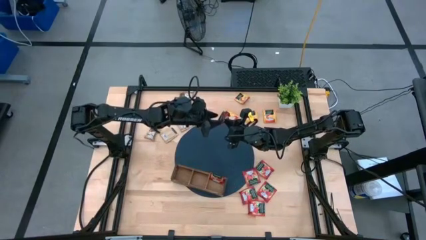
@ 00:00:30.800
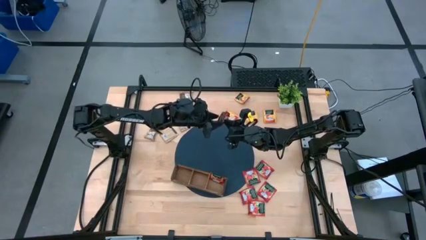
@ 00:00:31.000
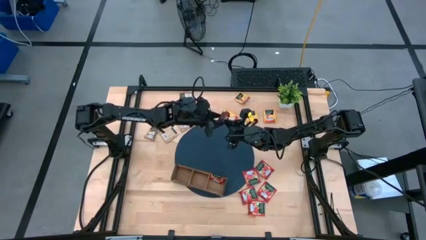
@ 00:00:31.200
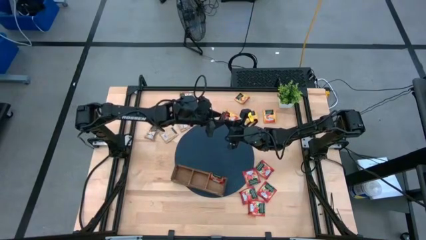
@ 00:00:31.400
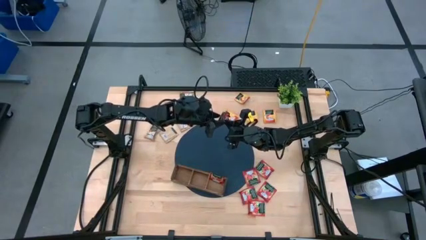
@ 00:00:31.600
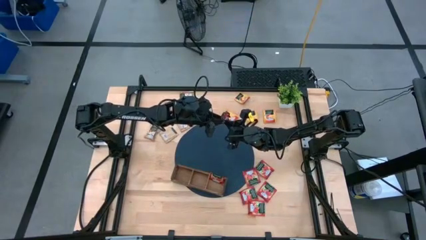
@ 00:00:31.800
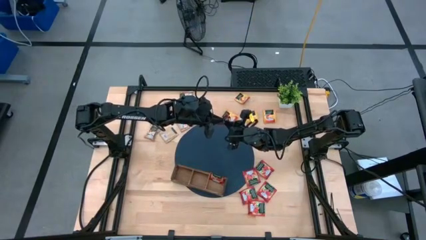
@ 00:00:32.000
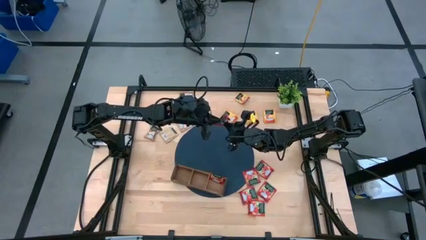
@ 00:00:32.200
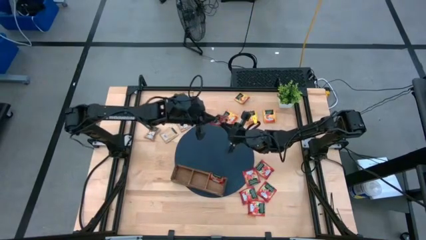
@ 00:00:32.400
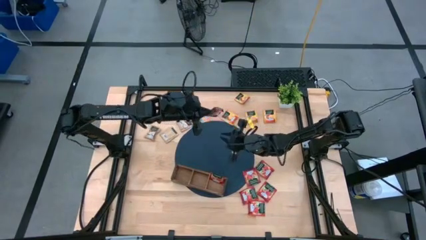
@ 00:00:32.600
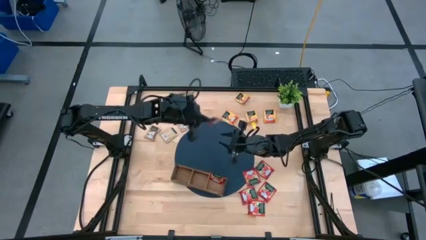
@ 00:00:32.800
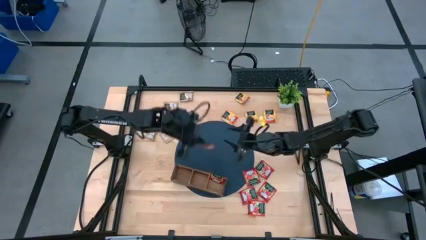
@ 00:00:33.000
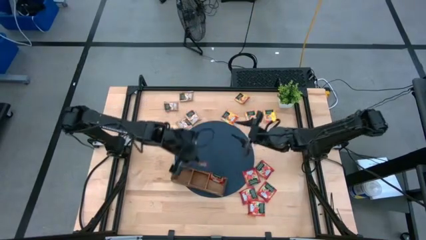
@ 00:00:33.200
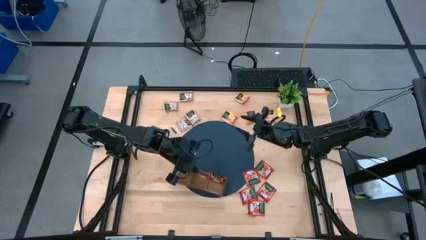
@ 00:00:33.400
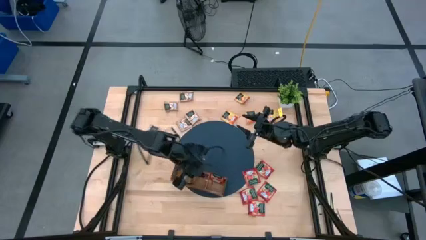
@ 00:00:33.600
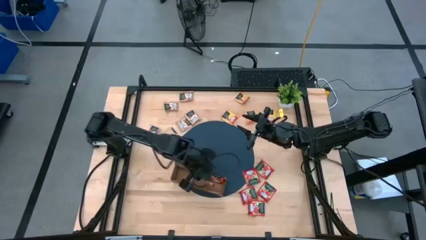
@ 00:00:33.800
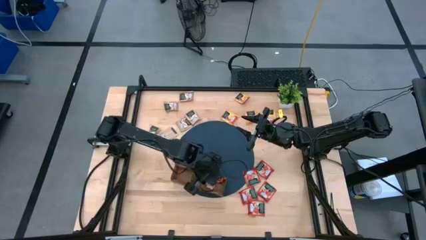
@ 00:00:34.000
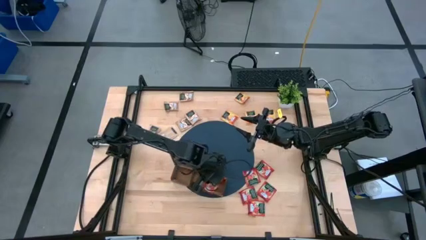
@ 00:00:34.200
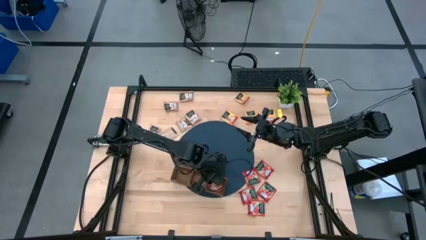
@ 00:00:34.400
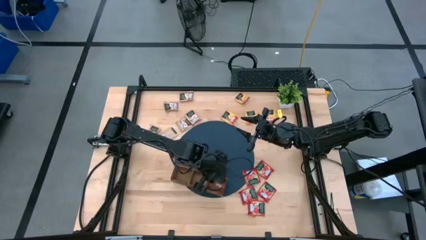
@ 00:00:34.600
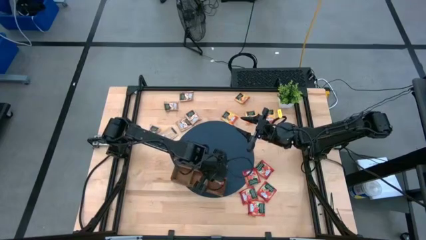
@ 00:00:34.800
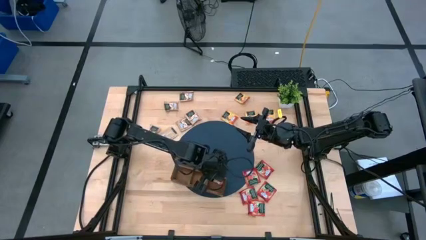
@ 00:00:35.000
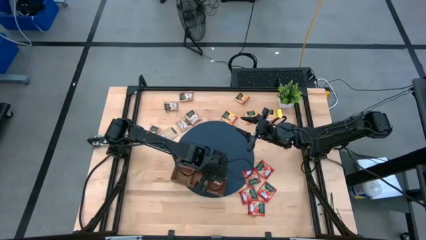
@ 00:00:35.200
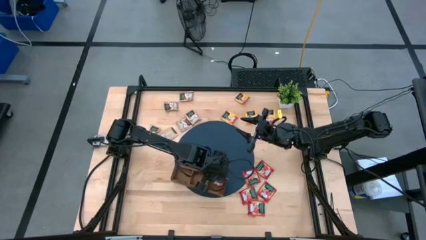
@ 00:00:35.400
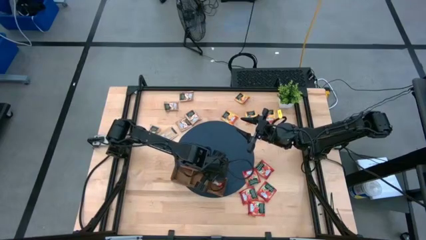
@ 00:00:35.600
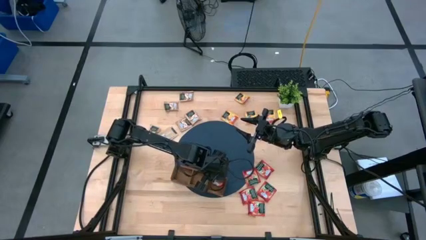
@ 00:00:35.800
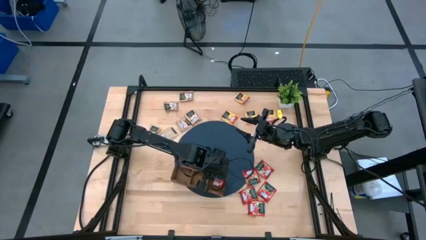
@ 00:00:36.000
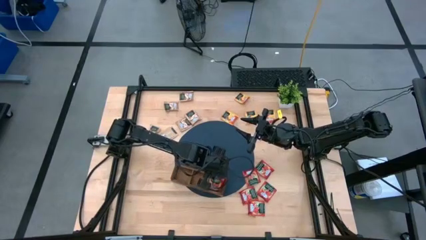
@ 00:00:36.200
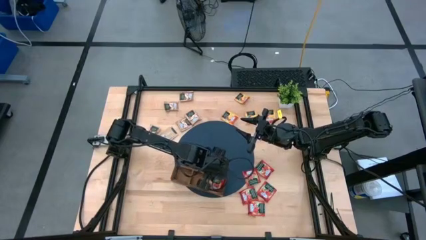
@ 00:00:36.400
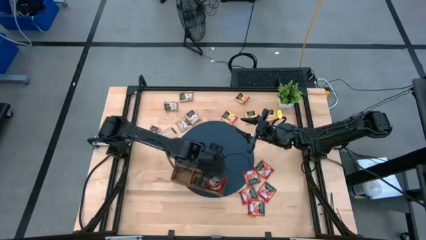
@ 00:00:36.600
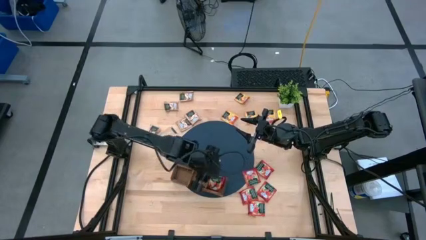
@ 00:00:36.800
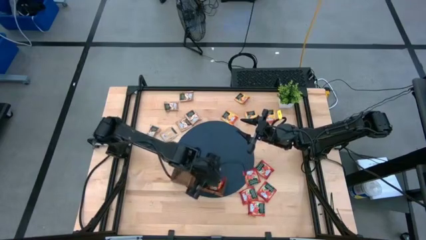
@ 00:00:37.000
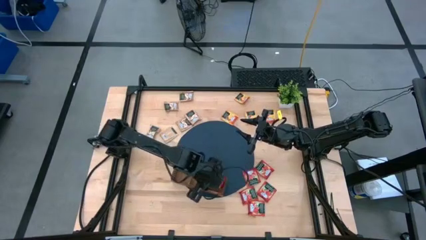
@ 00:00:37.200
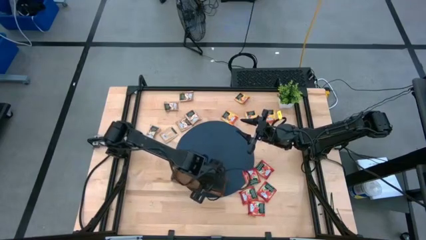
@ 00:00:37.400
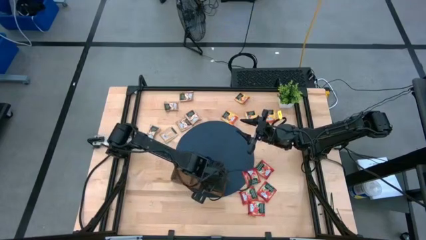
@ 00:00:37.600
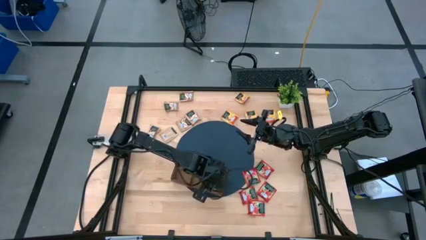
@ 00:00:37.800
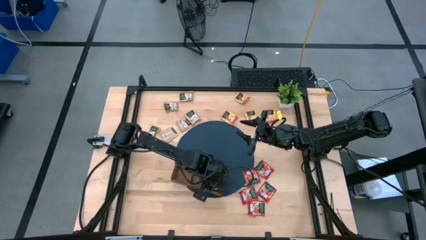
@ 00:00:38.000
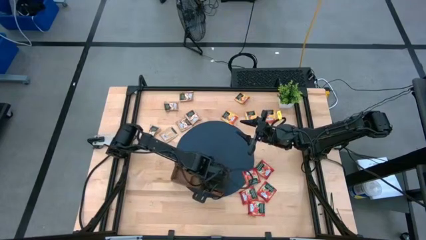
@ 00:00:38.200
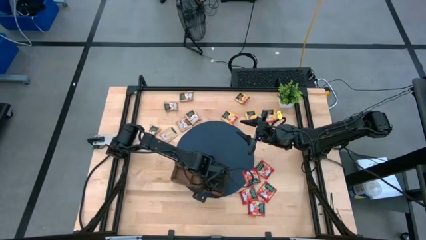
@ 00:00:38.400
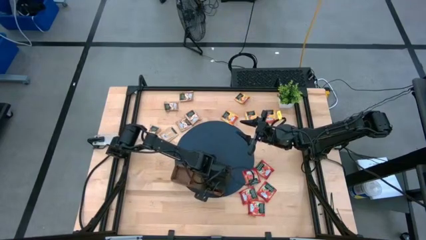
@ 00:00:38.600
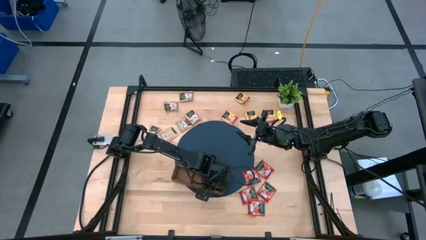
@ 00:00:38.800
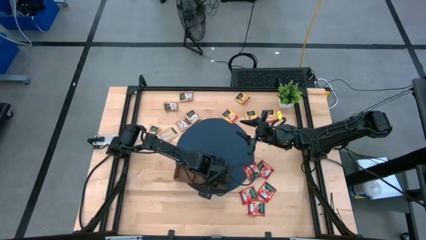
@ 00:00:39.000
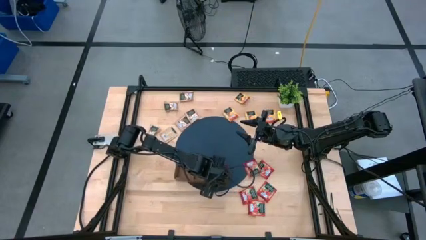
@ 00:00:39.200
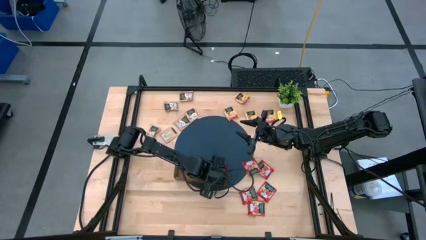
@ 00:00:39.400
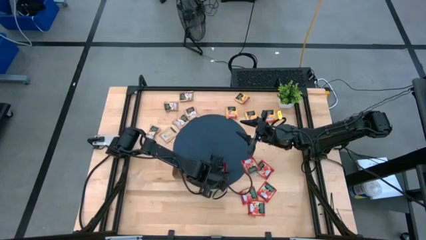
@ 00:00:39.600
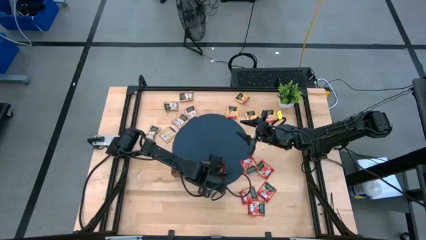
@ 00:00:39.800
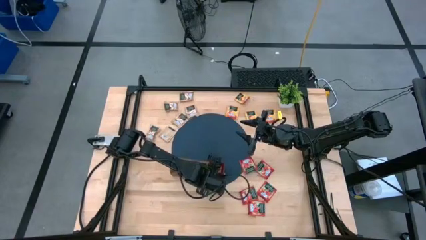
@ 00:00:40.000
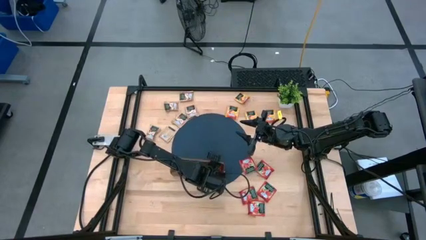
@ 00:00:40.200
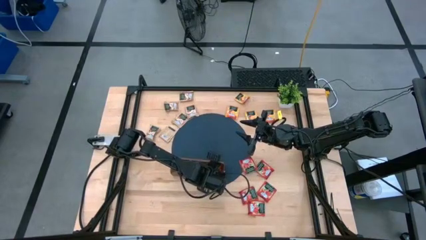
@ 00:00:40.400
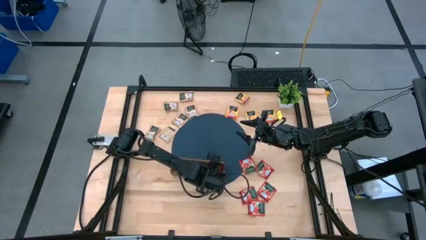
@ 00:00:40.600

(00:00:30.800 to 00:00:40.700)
Task: Pick & Place Tea
Put the red tea bag into the right section of the wooden organizer

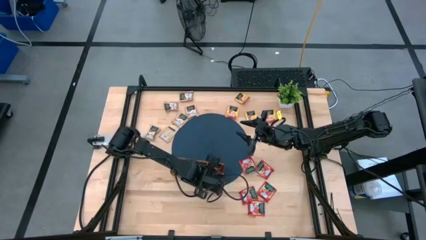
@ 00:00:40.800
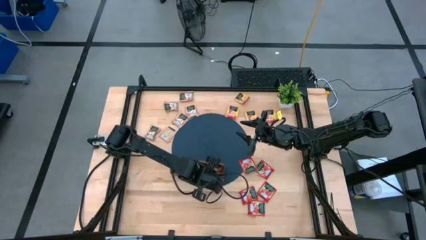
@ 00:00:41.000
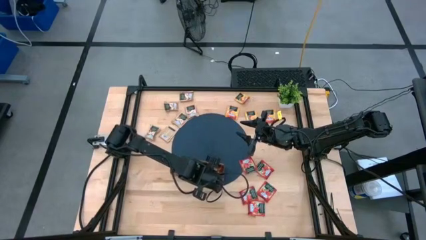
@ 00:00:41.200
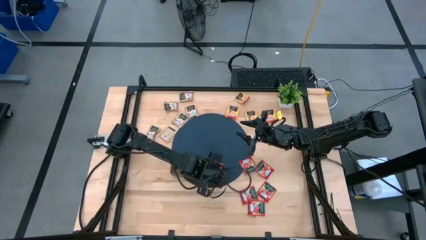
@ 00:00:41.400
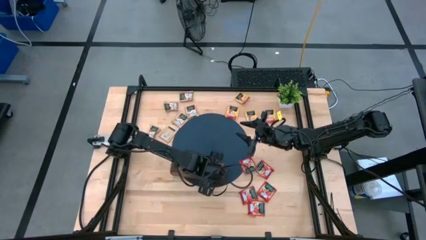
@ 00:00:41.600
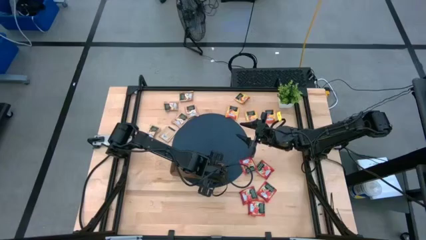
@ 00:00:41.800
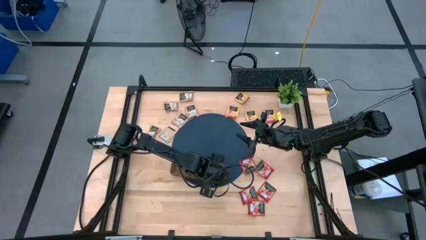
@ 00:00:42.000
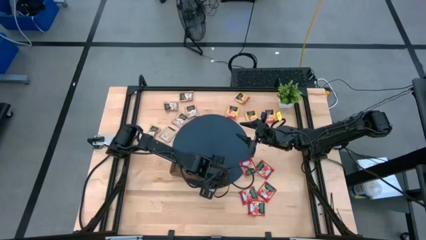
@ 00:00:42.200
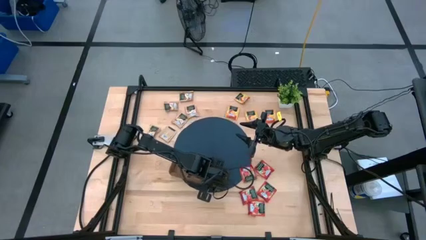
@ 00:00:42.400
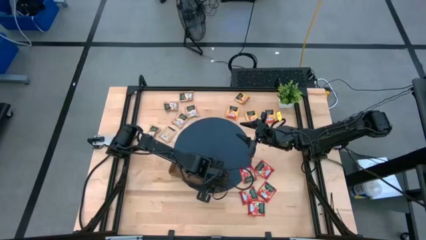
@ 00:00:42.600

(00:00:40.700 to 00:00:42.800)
Adjust the wooden organizer

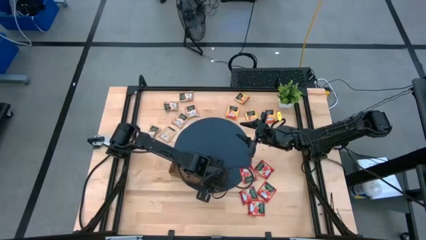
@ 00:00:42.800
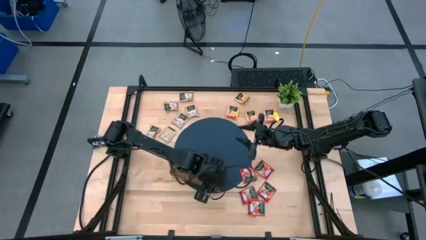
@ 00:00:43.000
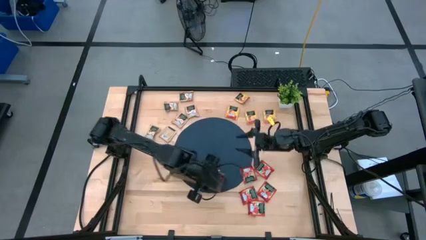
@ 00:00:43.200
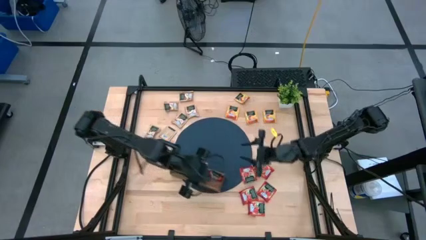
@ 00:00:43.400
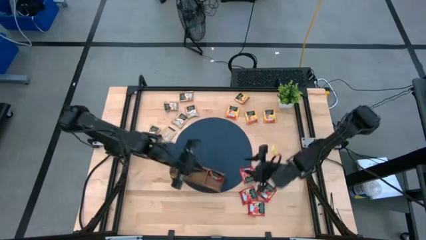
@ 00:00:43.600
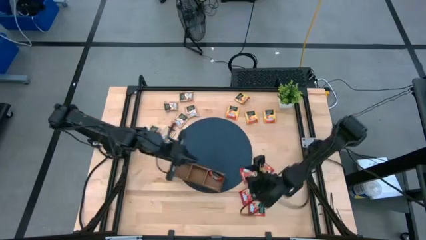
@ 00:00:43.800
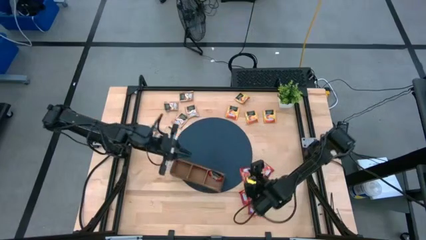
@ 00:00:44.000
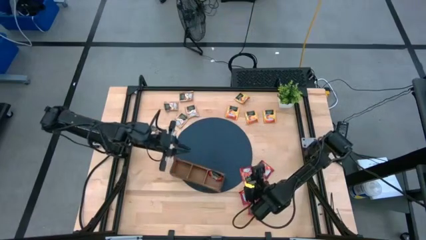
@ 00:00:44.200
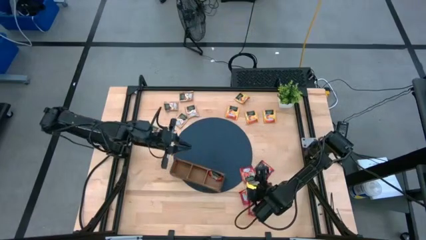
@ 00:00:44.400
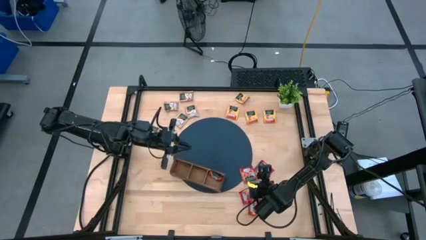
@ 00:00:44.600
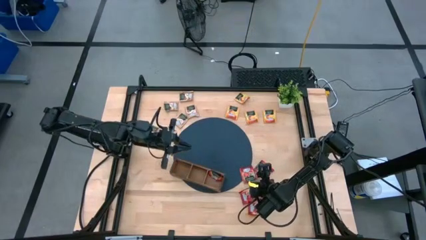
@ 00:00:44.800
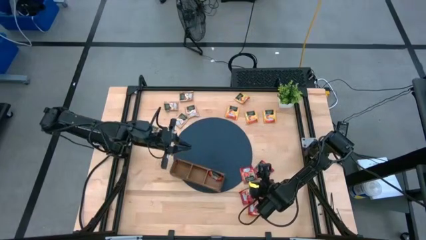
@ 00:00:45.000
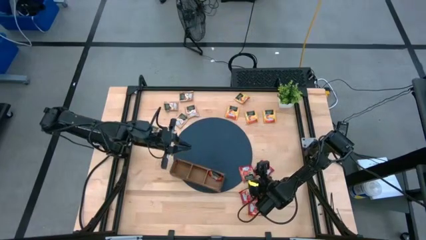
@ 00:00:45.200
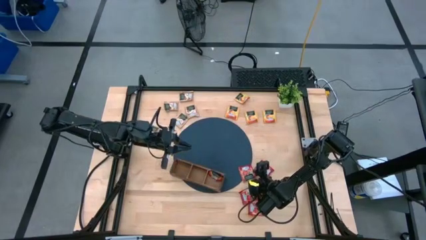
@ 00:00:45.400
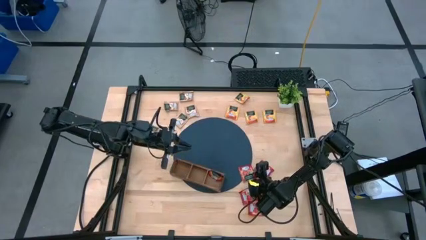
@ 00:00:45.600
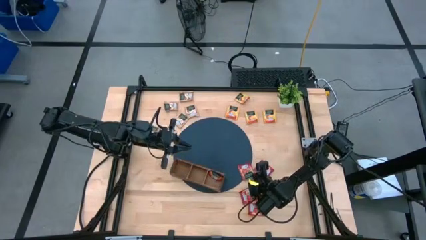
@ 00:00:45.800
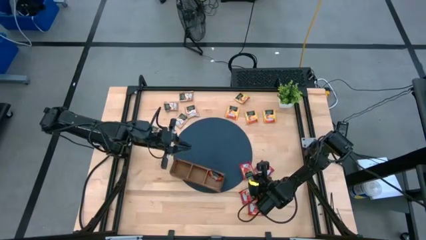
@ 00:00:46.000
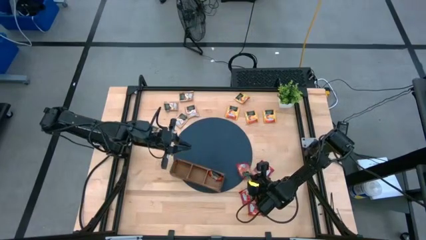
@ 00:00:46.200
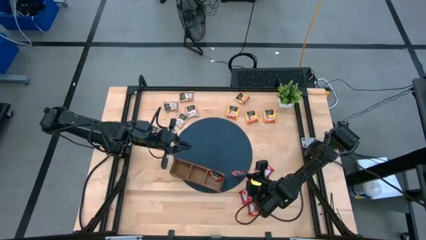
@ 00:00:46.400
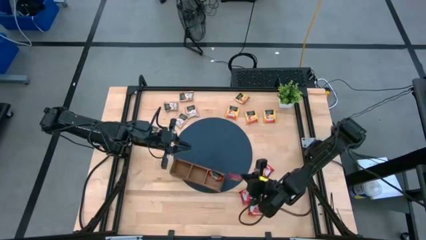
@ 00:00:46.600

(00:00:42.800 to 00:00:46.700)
Put the red tea bag into the right section of the wooden organizer
